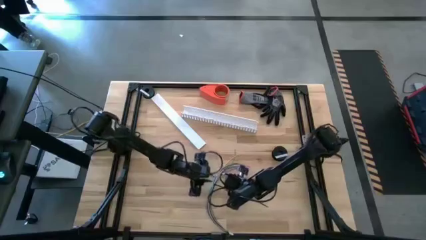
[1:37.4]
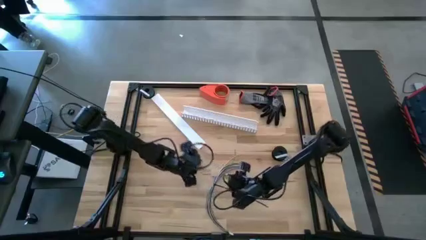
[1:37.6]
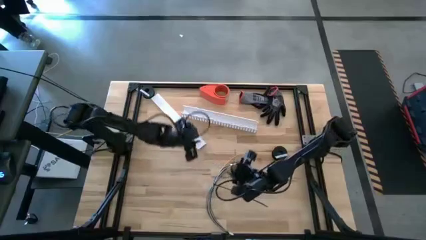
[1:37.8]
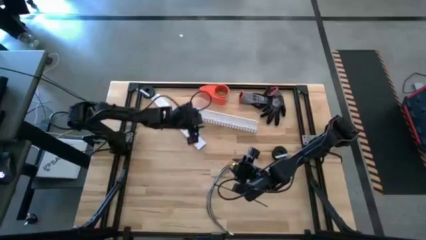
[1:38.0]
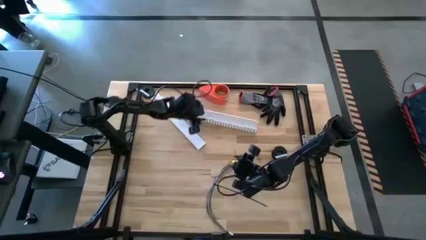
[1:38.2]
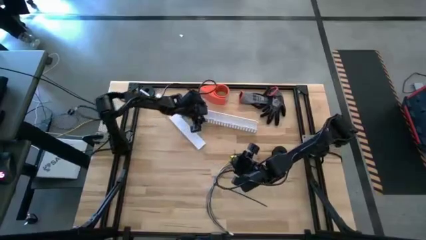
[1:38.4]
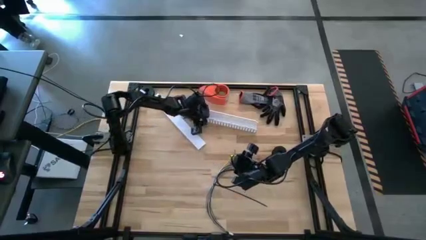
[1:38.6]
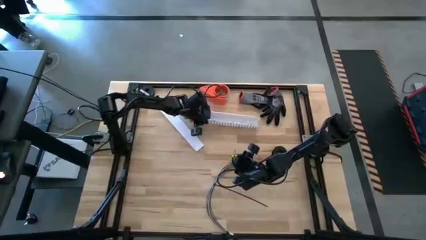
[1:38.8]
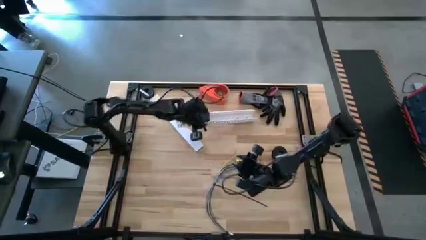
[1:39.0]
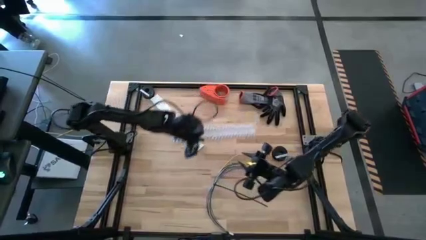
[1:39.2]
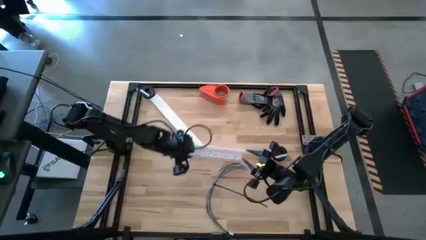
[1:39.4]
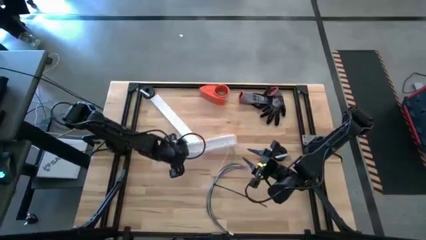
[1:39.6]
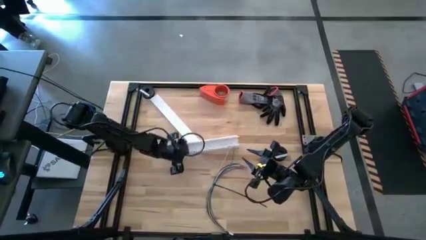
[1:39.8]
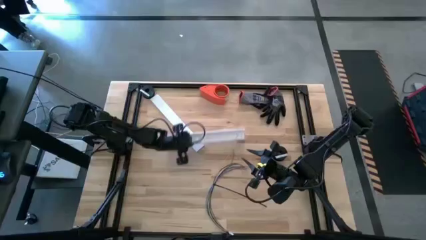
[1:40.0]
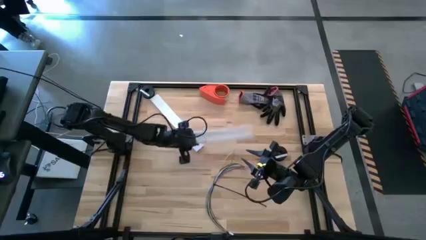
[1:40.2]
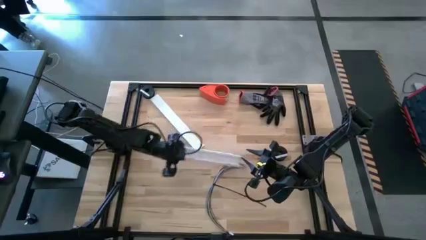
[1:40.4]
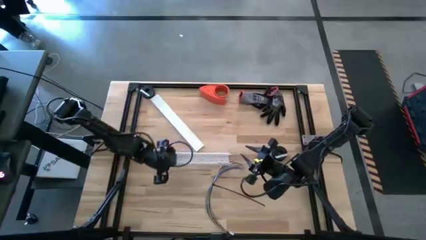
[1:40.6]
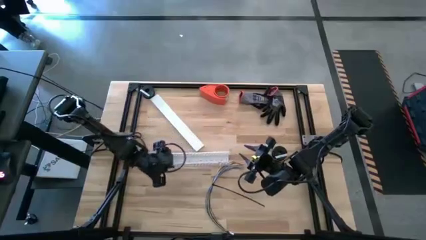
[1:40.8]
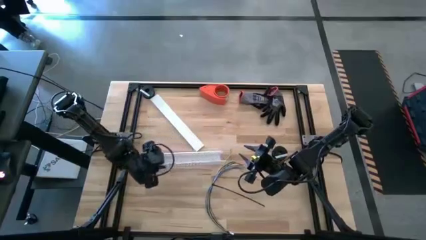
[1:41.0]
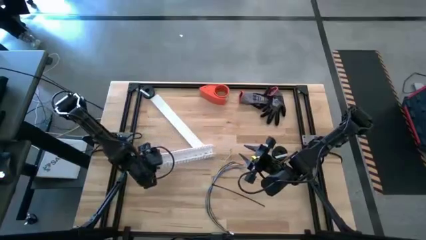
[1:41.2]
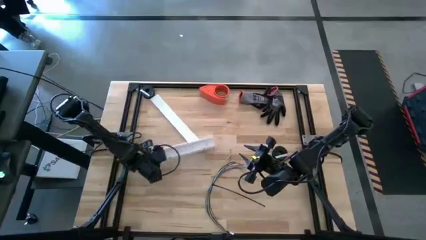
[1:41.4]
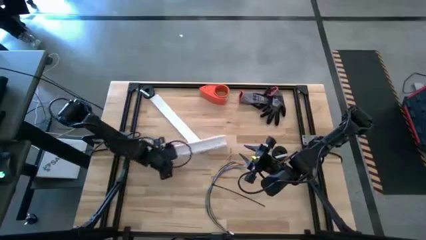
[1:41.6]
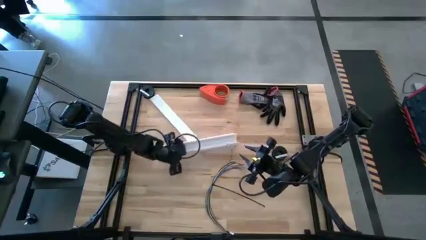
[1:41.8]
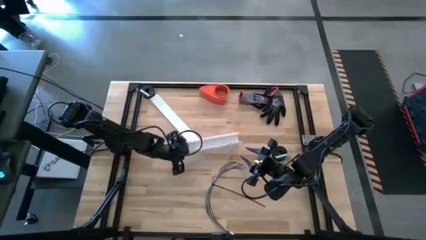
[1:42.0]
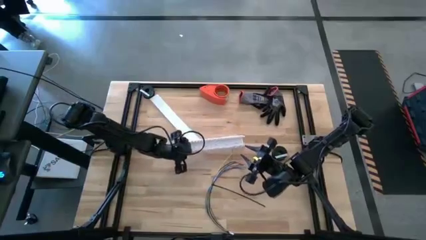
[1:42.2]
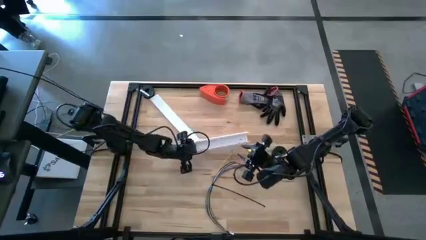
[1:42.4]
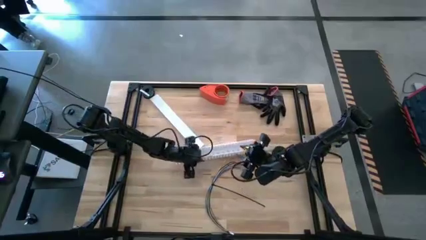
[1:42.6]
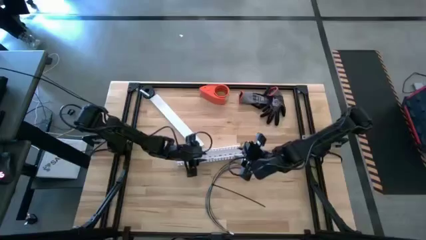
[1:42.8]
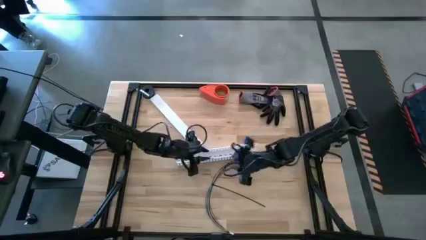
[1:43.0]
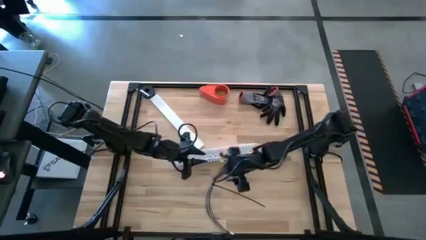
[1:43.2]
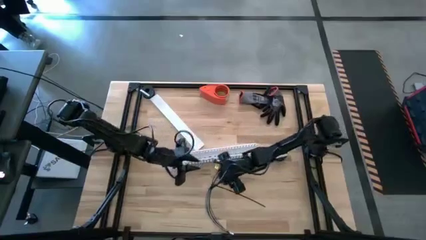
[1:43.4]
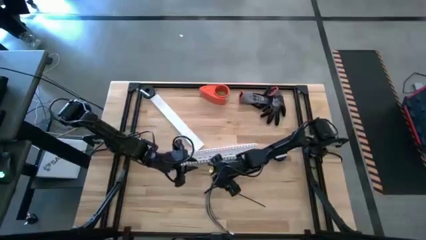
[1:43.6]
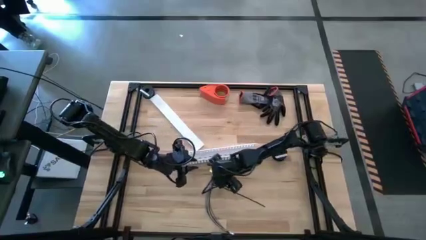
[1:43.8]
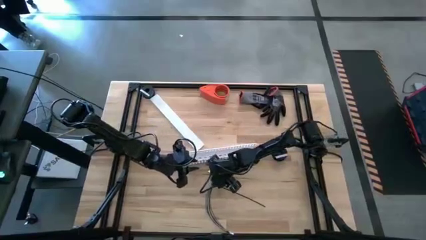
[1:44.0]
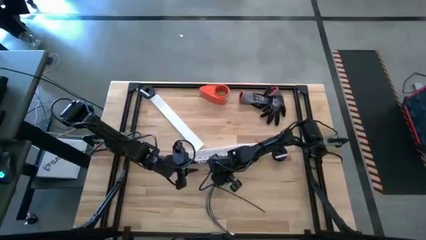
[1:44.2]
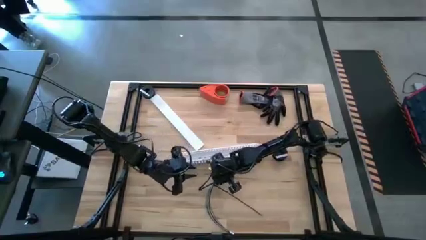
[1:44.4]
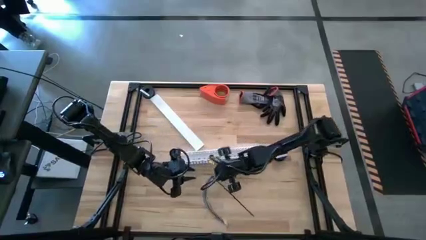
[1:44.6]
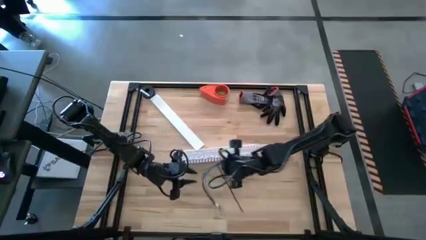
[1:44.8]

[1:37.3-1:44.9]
Task: Ziptie cables
Put the ziptied cable wires into the white cable duct

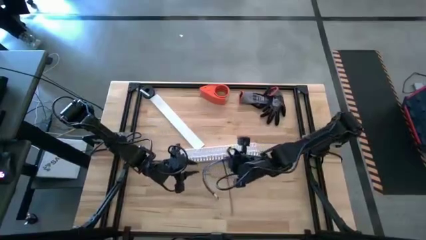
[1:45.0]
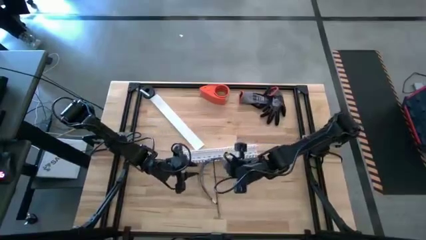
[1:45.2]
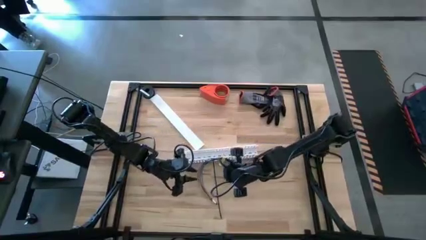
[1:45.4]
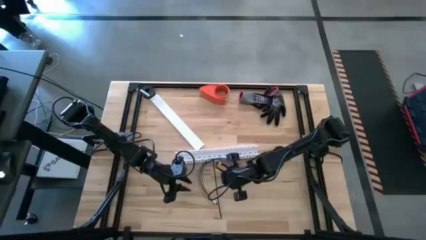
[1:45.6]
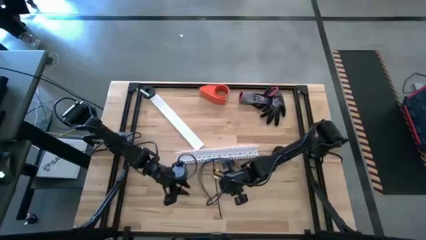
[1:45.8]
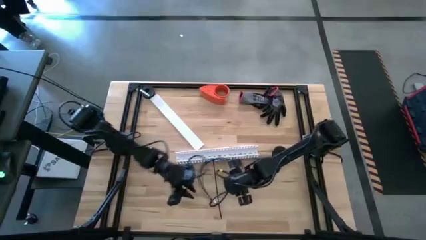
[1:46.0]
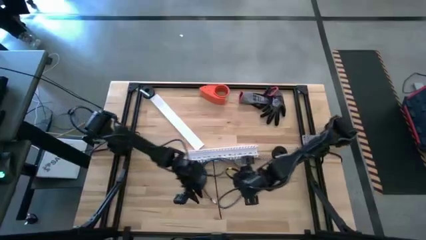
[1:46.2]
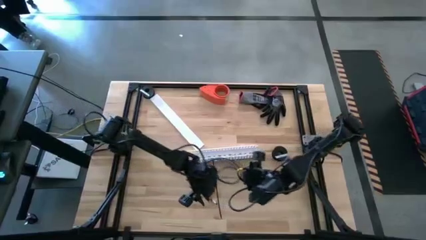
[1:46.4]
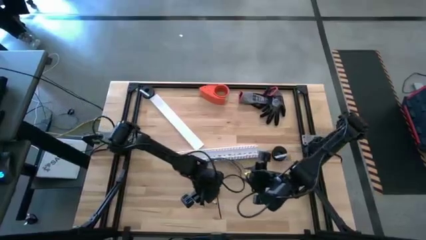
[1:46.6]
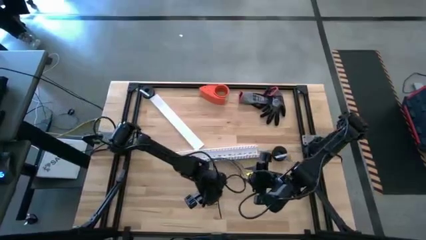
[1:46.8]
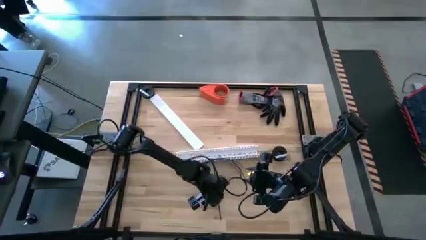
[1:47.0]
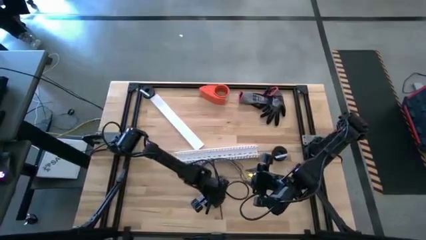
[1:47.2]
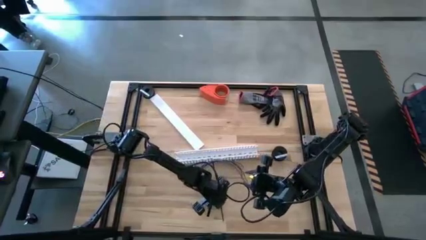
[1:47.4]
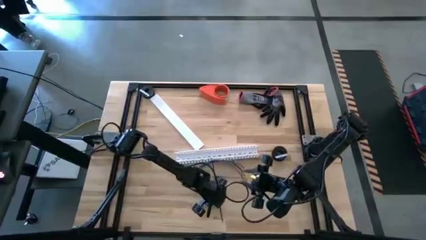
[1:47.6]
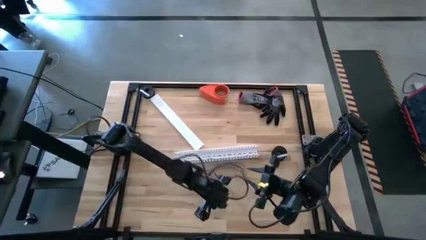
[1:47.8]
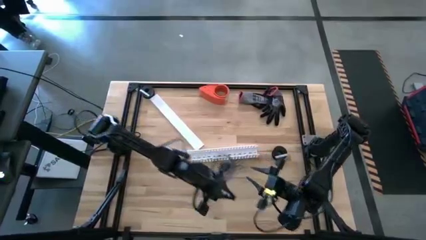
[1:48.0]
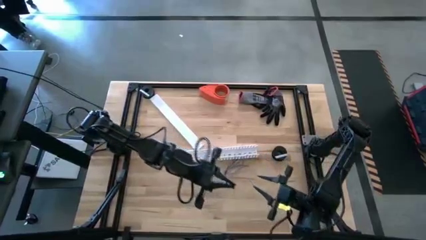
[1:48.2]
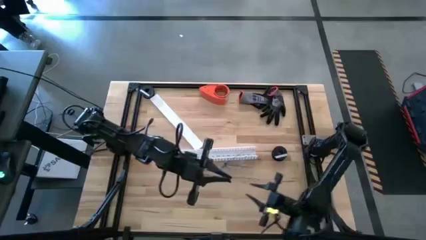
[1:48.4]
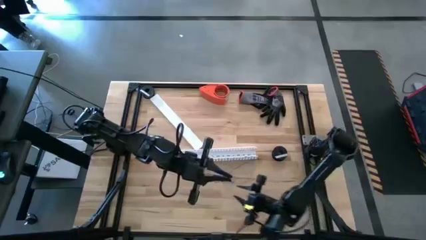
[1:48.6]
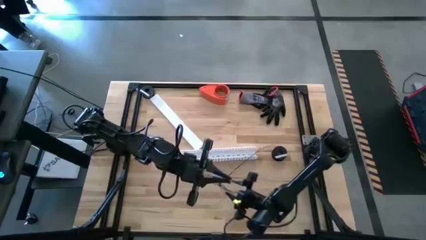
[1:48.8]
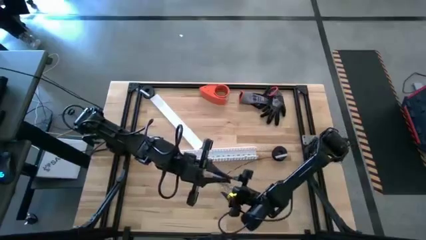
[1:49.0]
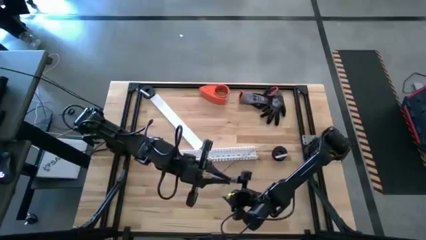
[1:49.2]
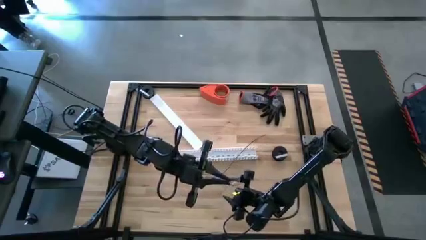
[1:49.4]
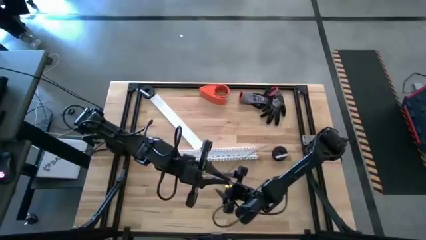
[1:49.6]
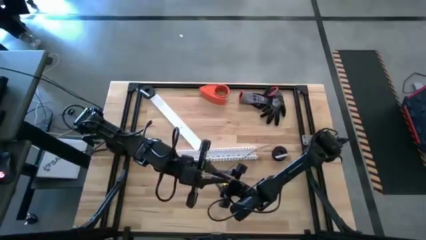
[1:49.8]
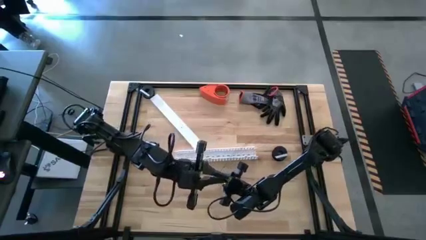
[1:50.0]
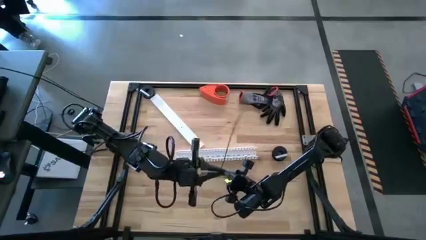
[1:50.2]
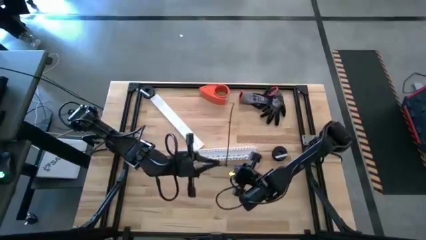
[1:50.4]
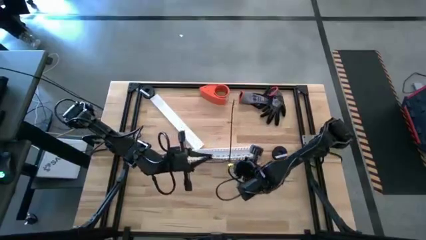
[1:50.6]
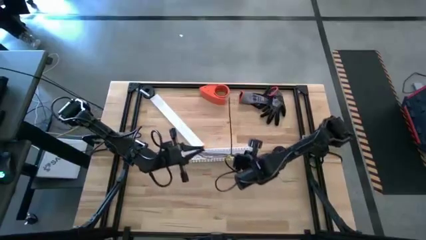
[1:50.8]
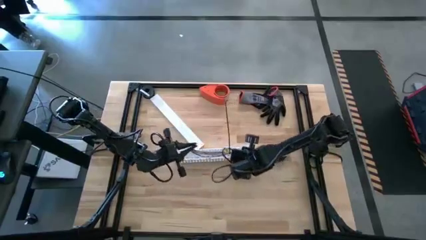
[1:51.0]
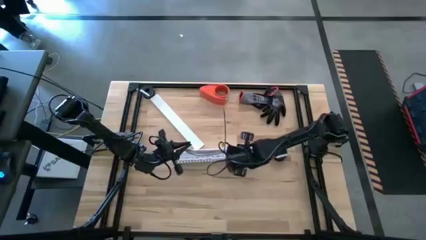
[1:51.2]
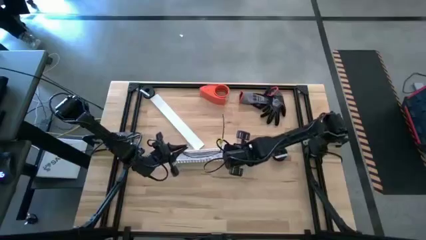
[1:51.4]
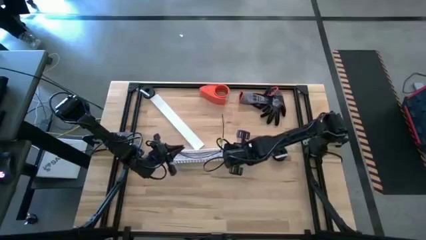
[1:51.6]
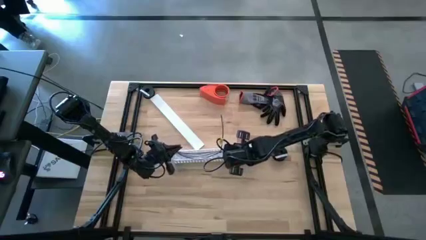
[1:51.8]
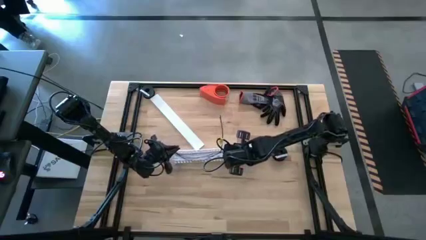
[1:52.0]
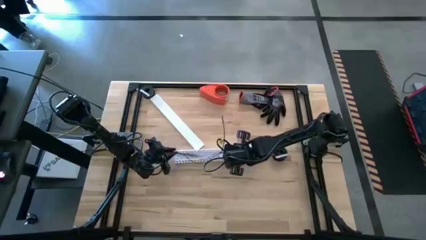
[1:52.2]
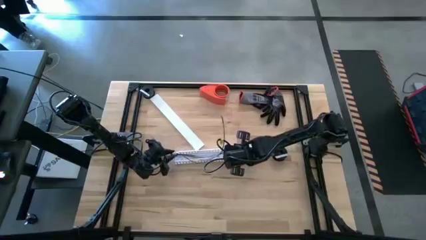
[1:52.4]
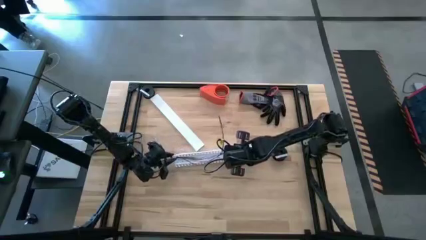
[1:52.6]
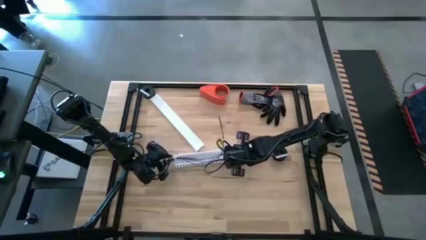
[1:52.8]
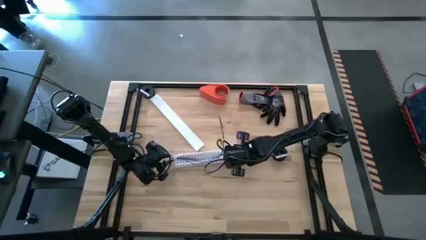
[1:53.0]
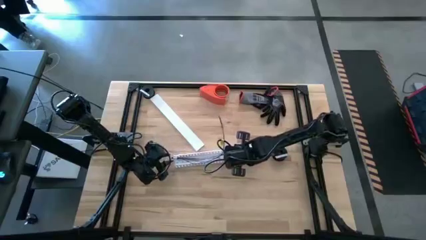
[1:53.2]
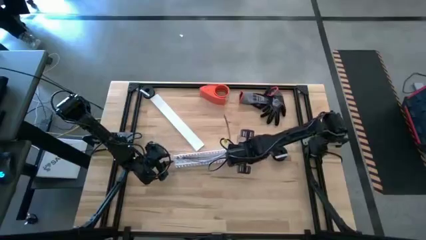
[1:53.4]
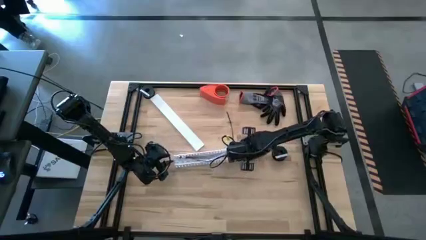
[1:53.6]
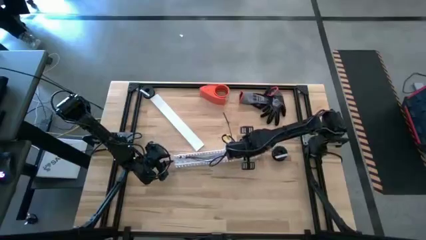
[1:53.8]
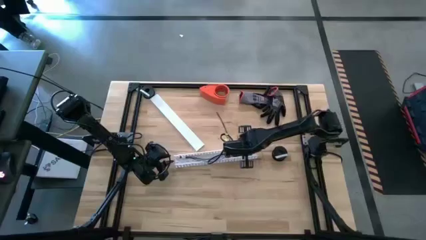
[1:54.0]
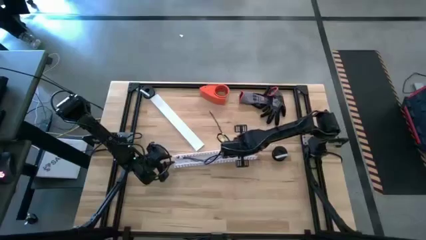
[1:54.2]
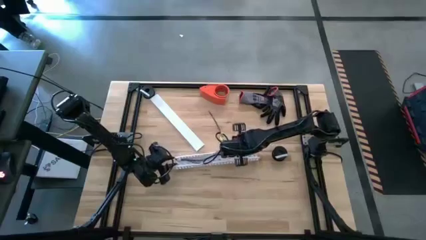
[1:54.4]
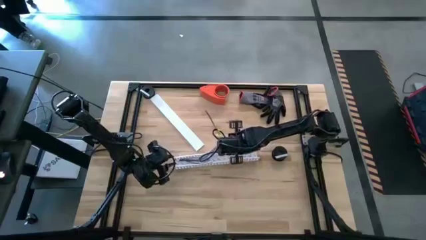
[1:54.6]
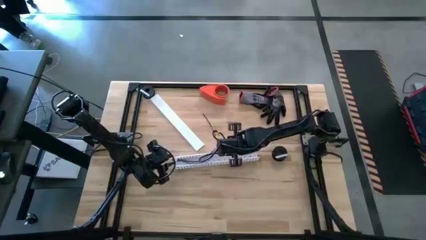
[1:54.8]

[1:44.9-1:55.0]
Put the black cables zip-tied cables into the white cable duct
